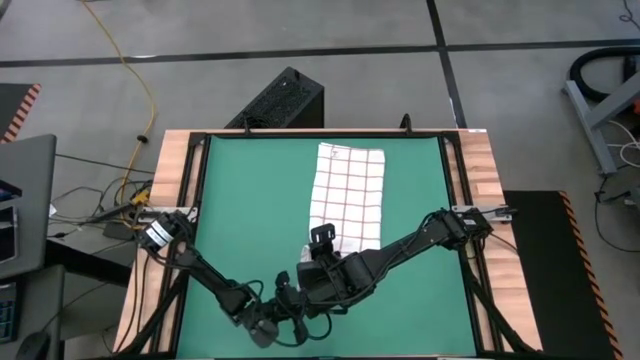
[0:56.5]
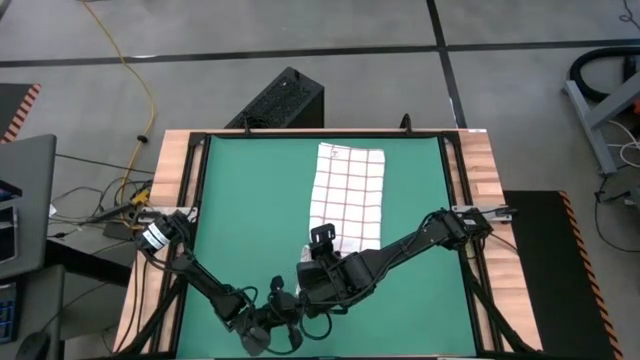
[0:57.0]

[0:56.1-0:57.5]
Task: Roll towel
Roll the white towel

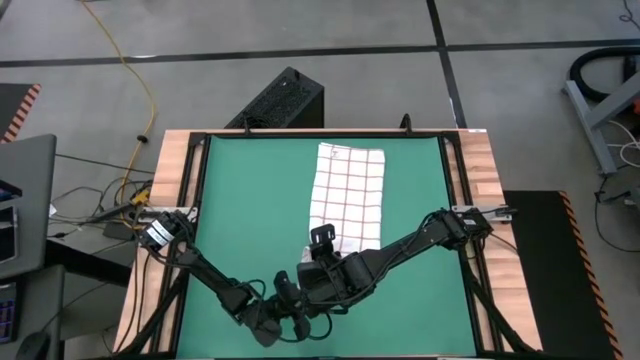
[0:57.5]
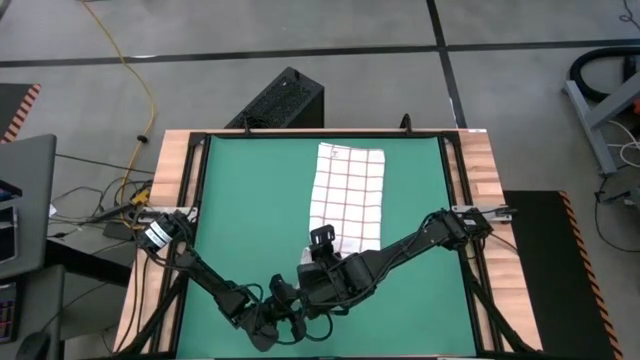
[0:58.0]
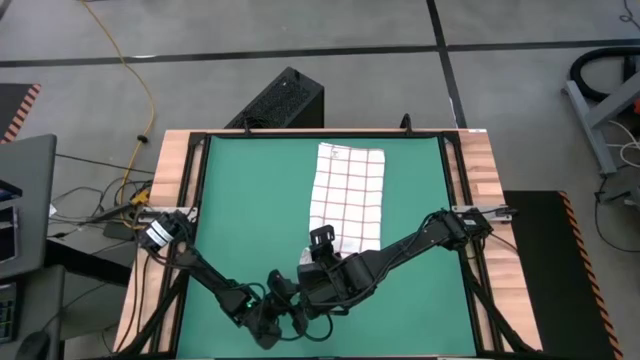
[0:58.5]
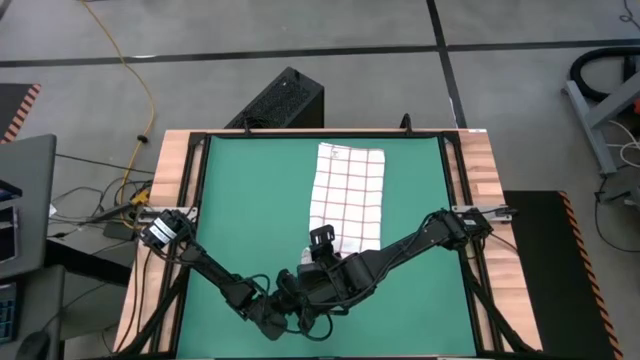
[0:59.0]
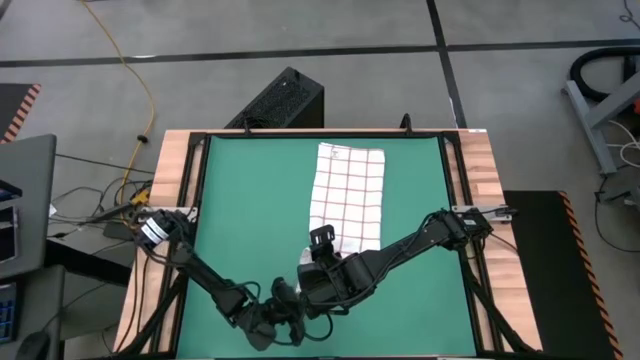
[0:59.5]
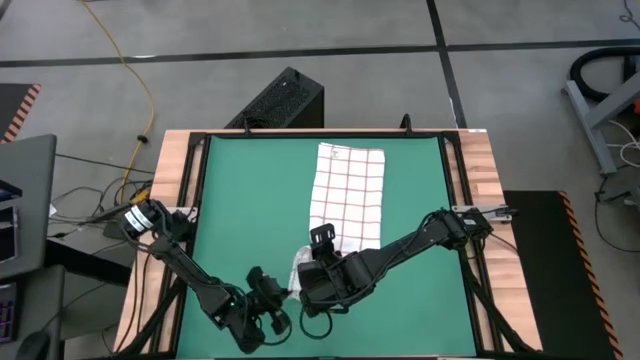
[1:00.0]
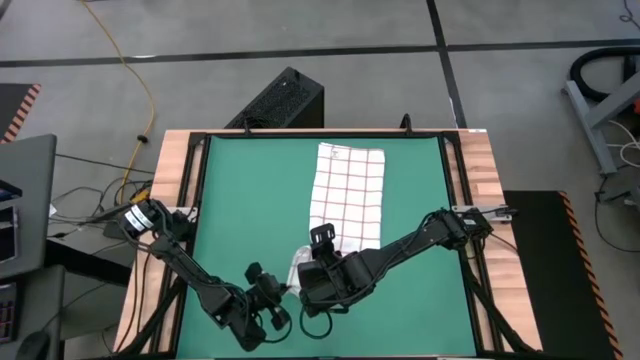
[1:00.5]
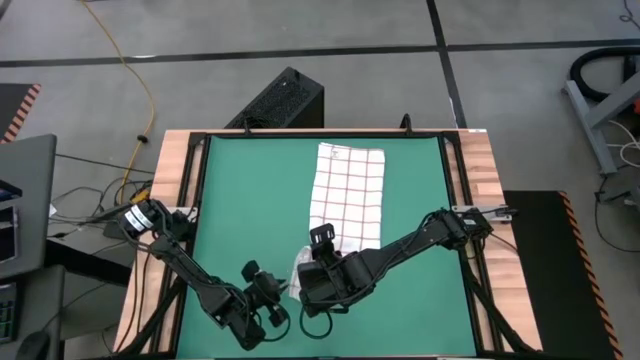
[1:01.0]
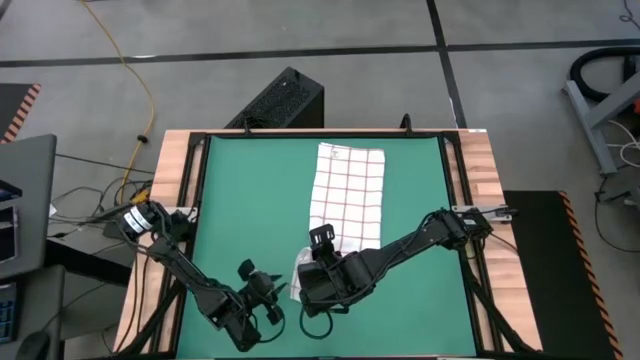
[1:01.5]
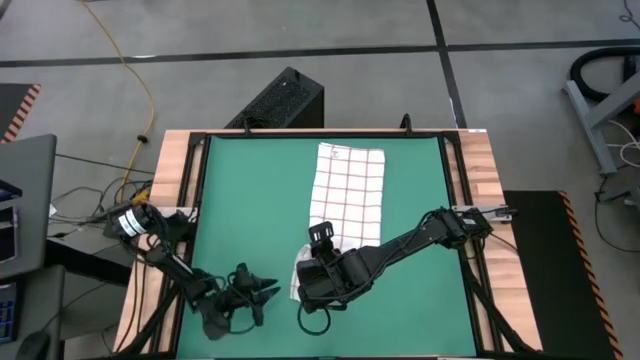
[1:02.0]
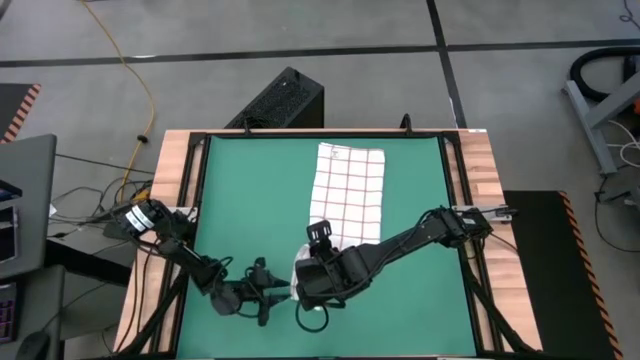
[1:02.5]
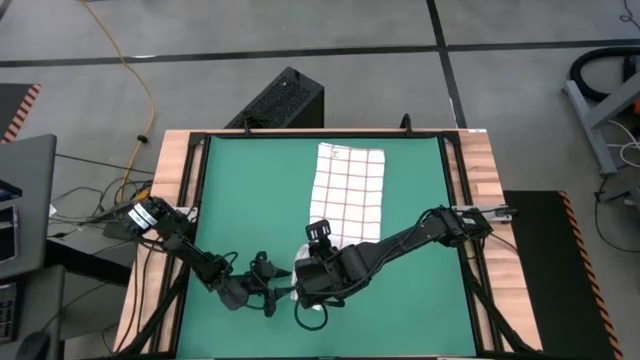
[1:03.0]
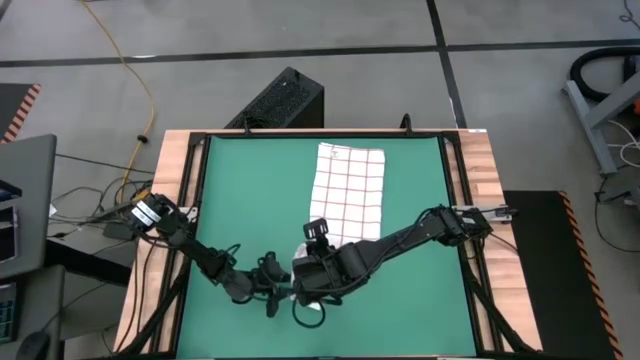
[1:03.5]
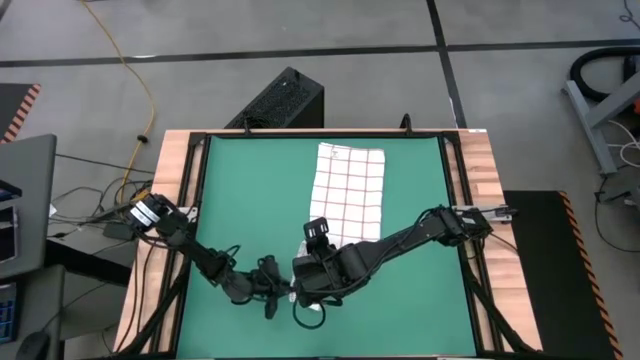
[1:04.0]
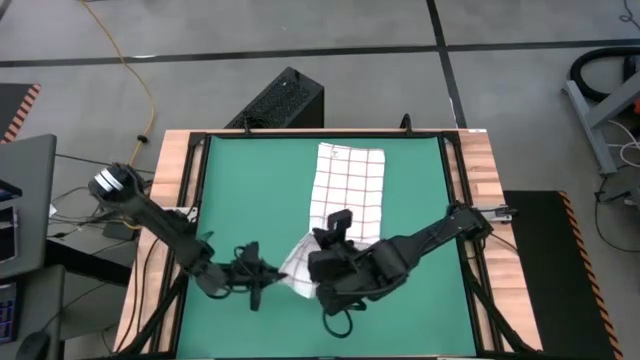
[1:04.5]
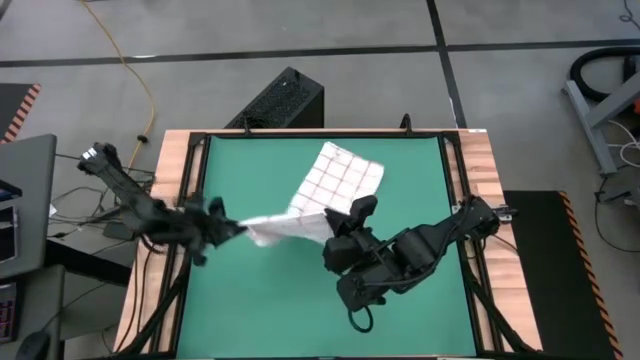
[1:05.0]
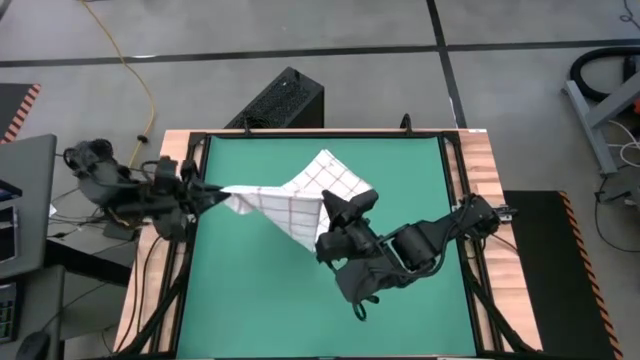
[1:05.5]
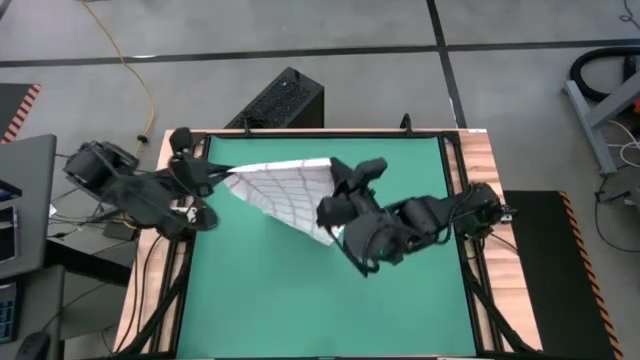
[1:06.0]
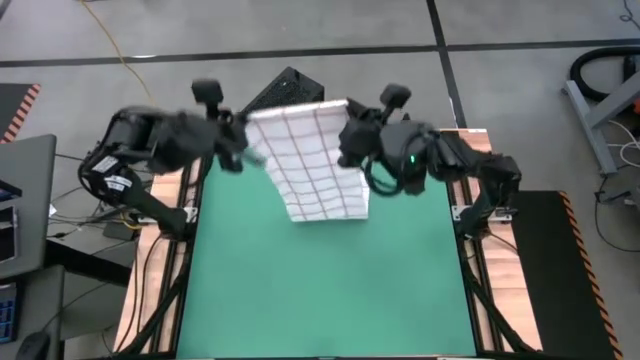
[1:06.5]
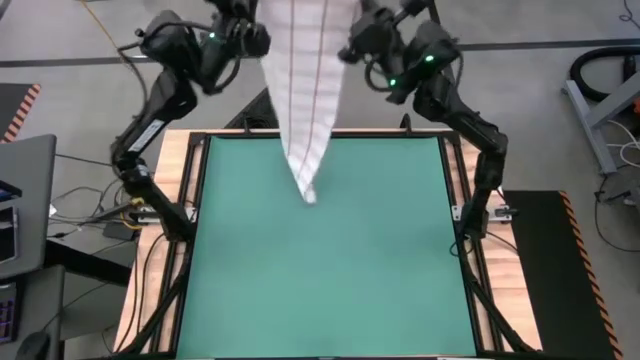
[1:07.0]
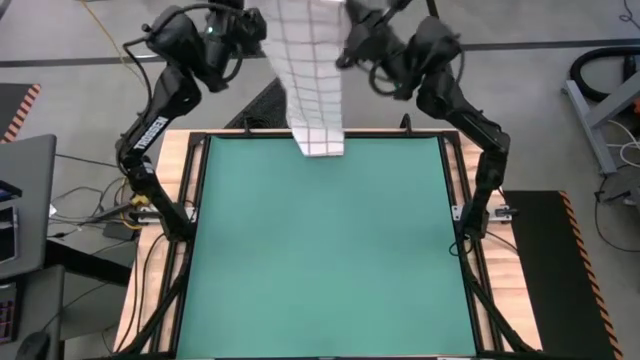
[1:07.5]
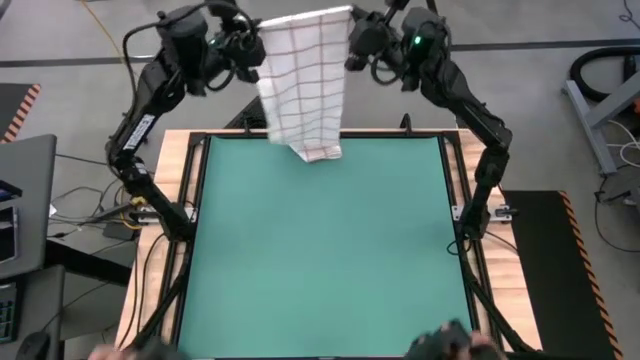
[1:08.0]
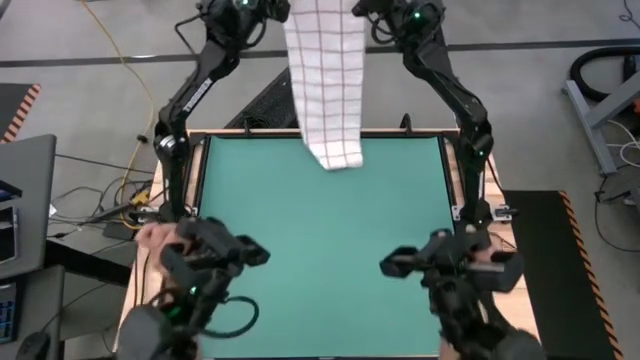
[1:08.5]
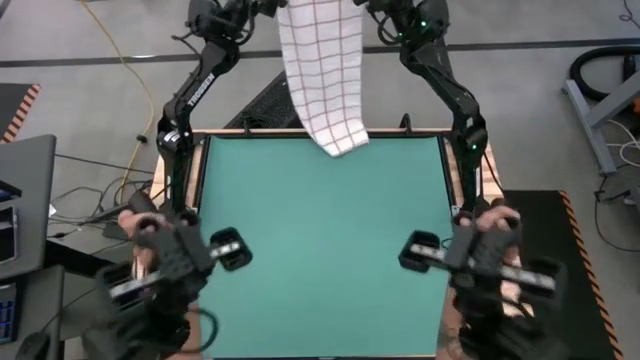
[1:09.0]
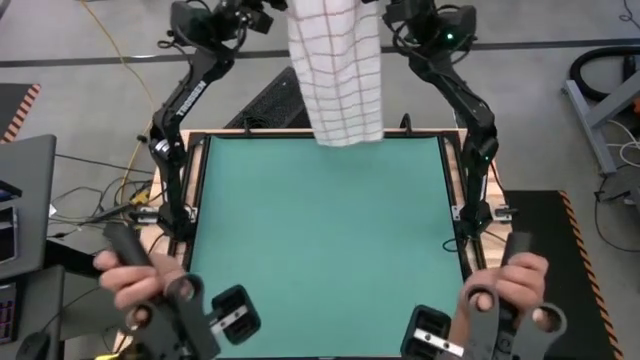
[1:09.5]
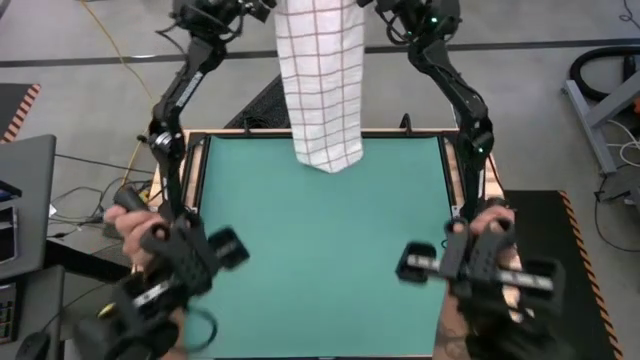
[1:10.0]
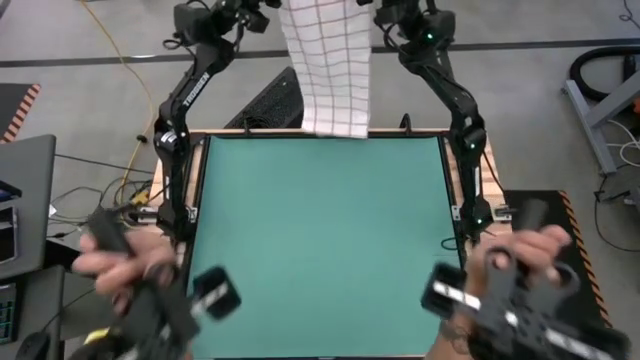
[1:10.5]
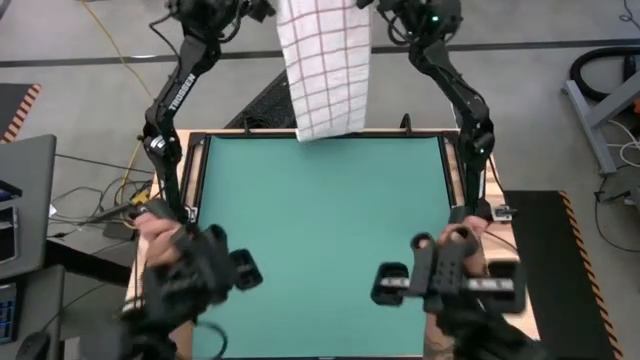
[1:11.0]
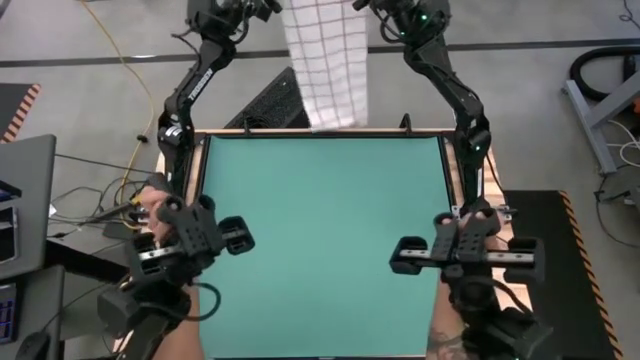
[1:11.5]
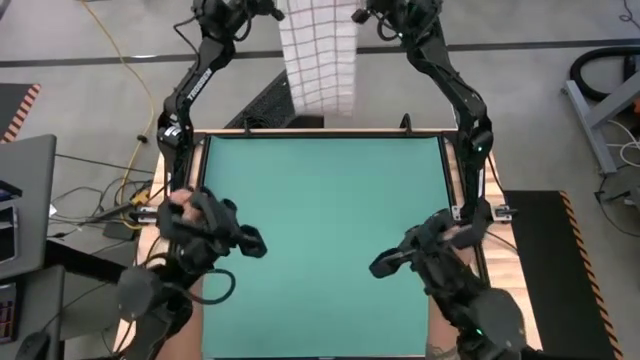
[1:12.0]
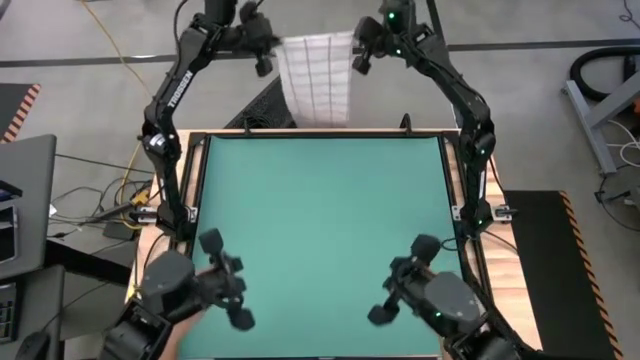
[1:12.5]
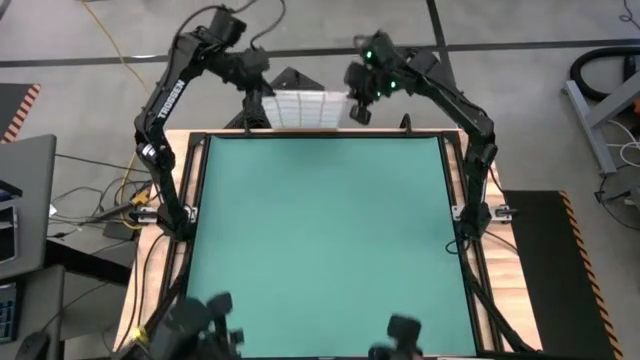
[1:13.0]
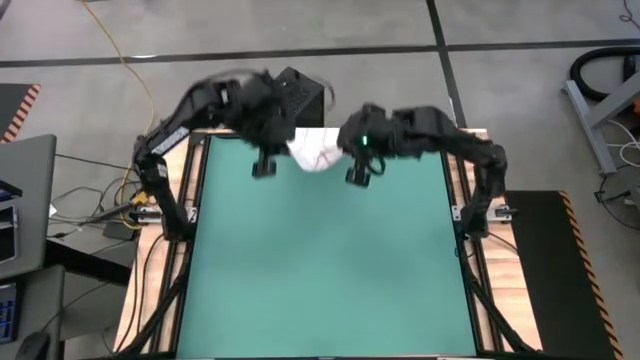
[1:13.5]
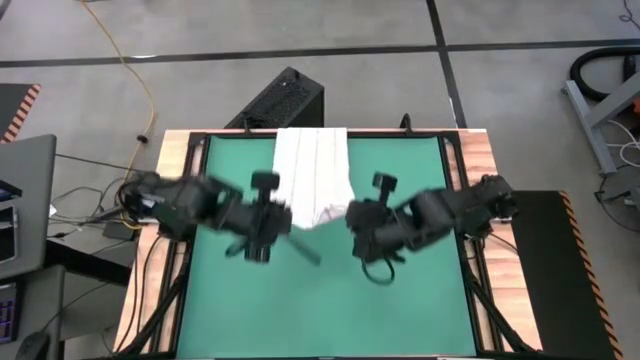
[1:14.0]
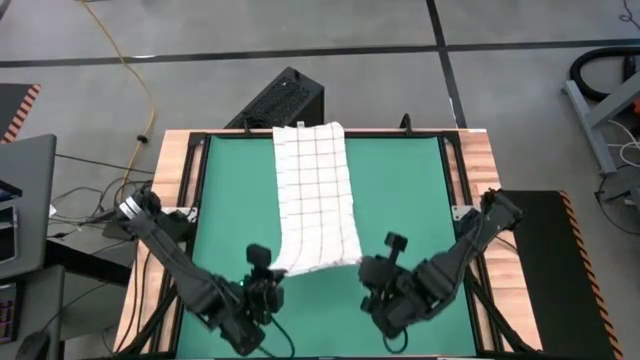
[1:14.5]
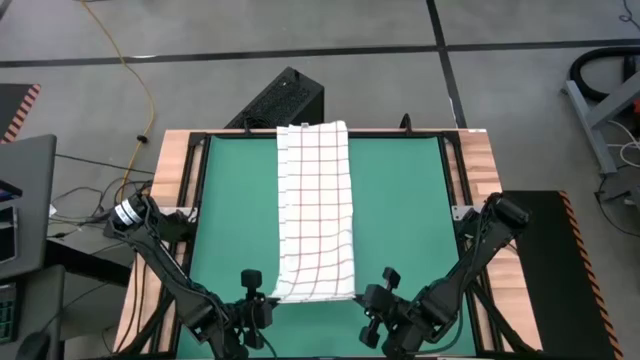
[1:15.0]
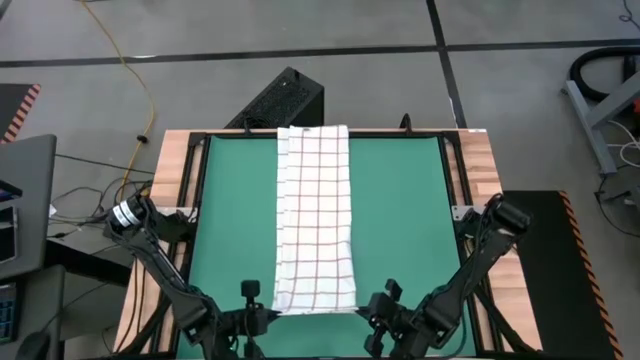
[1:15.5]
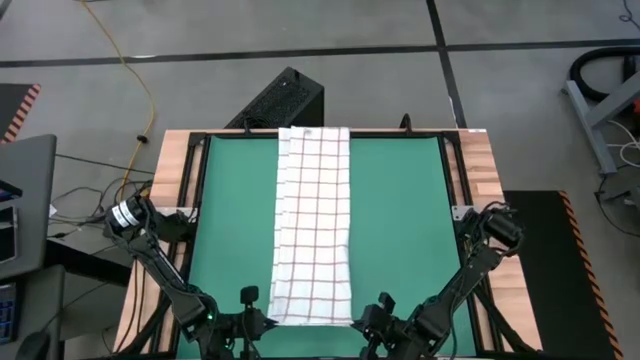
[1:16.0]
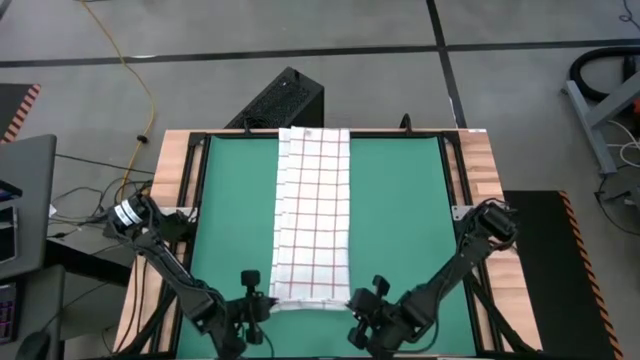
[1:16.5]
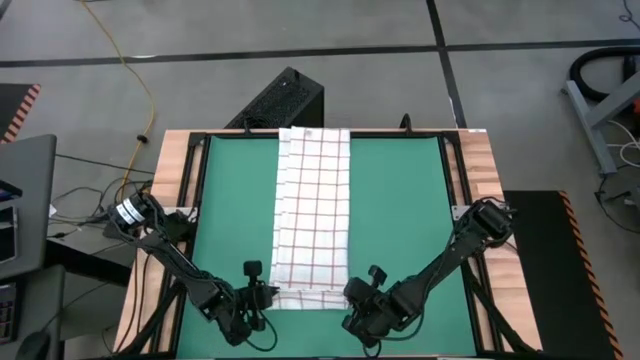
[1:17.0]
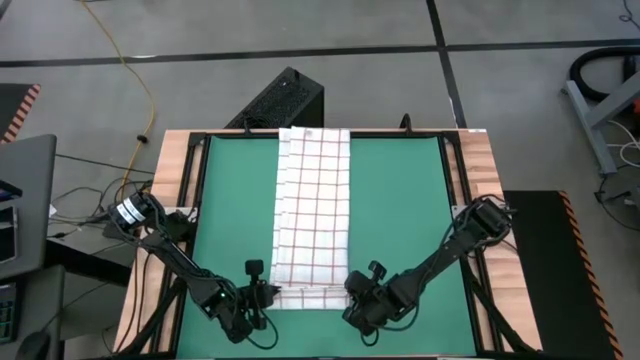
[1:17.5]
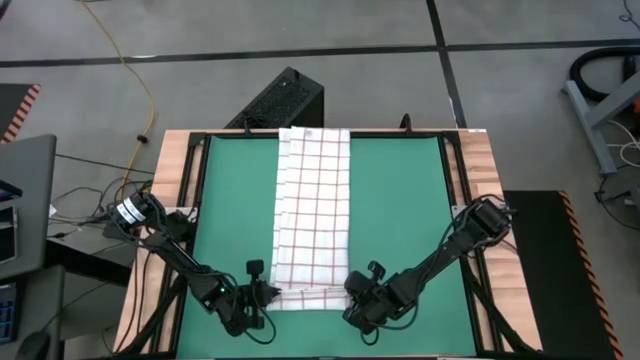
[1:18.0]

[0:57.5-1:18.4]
Roll the white towel
